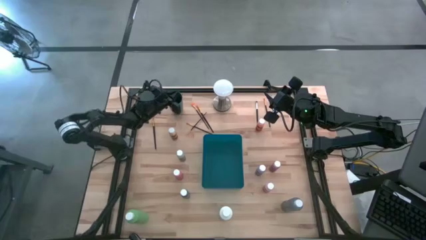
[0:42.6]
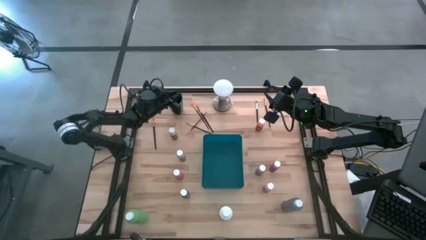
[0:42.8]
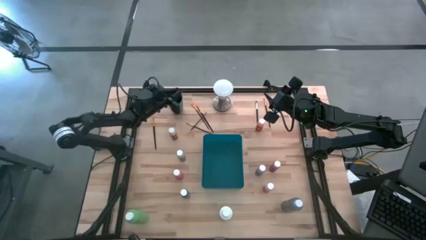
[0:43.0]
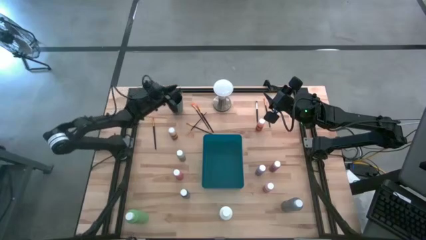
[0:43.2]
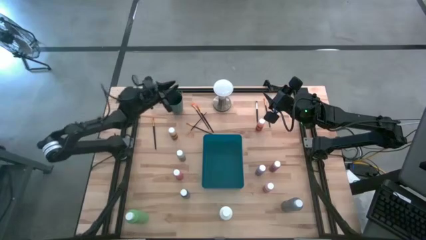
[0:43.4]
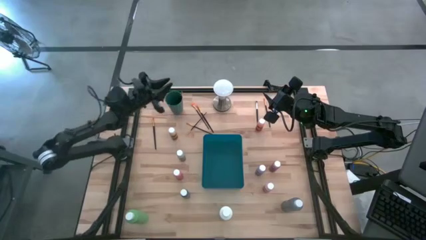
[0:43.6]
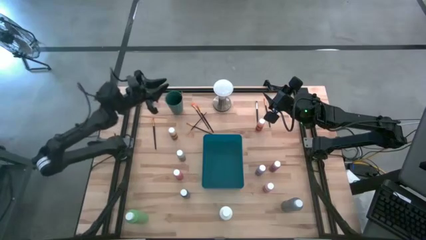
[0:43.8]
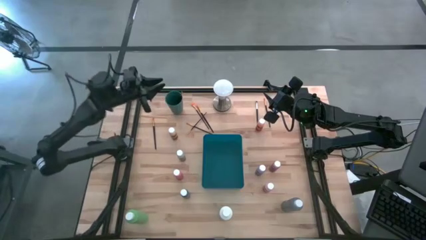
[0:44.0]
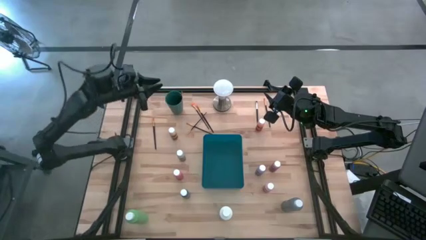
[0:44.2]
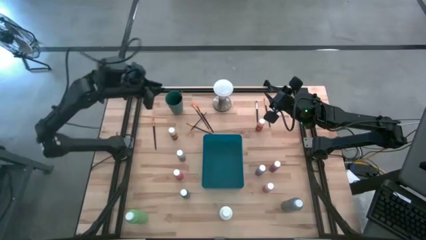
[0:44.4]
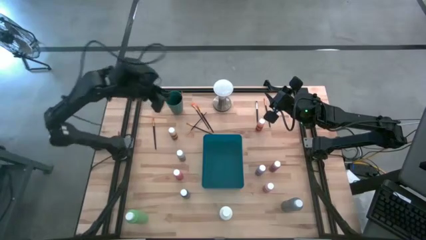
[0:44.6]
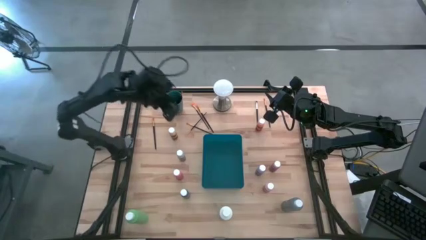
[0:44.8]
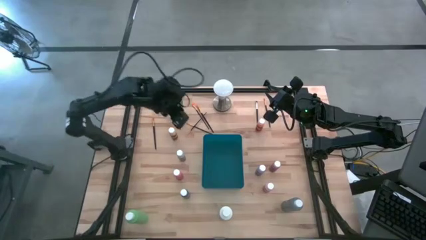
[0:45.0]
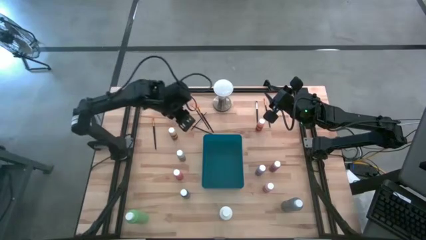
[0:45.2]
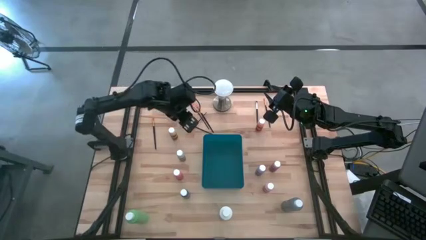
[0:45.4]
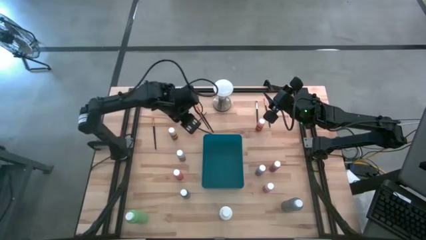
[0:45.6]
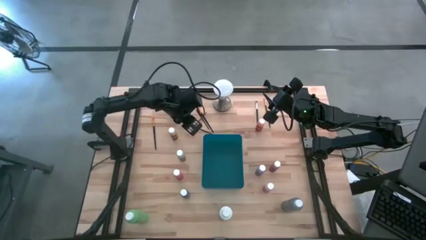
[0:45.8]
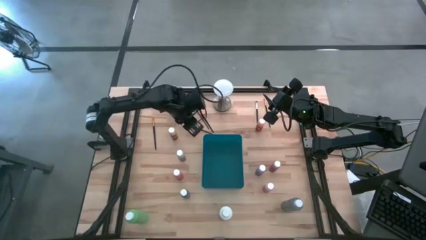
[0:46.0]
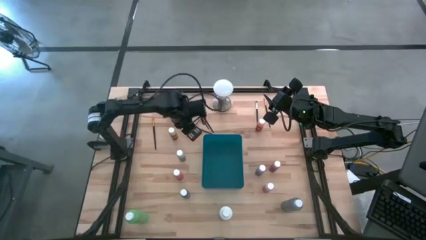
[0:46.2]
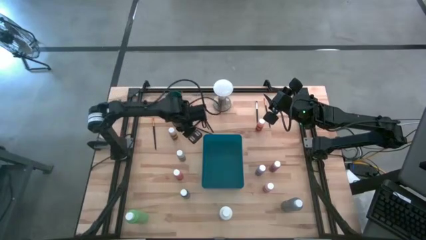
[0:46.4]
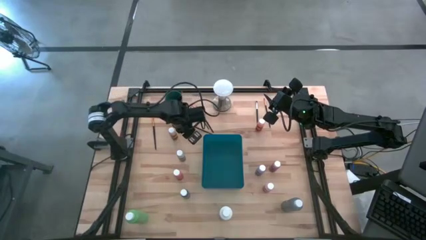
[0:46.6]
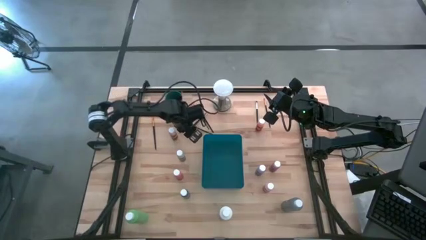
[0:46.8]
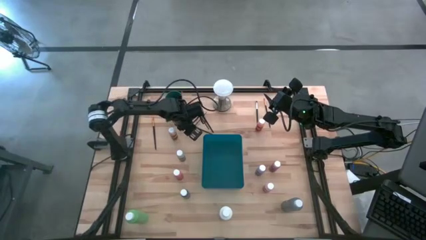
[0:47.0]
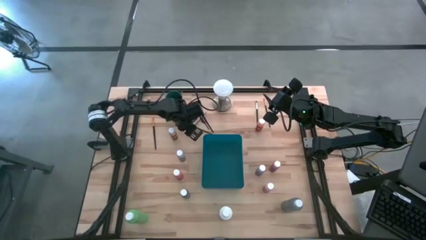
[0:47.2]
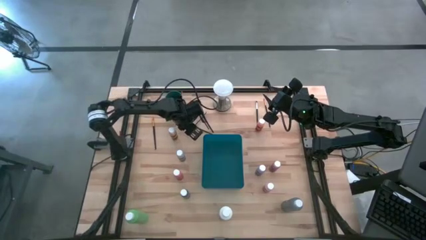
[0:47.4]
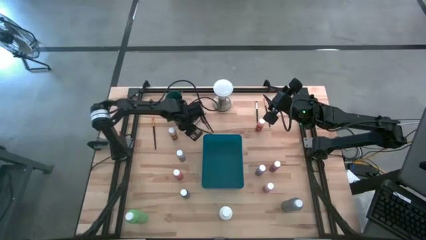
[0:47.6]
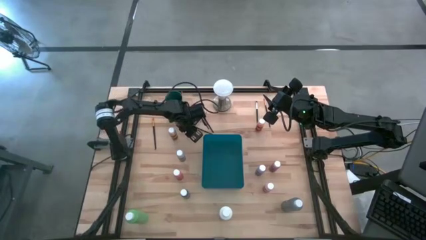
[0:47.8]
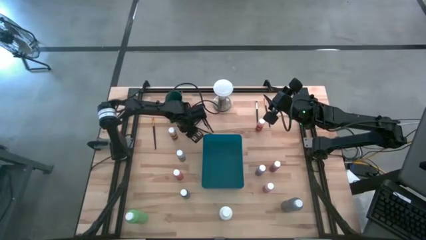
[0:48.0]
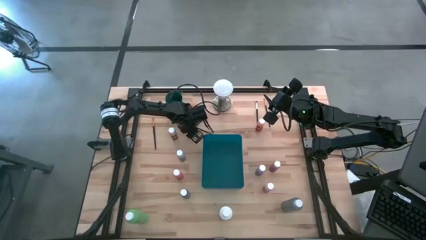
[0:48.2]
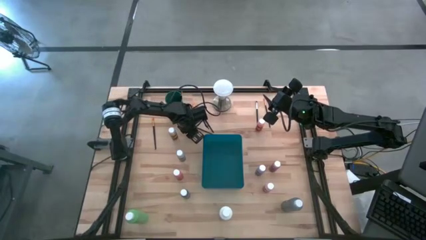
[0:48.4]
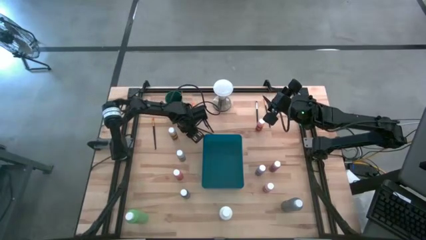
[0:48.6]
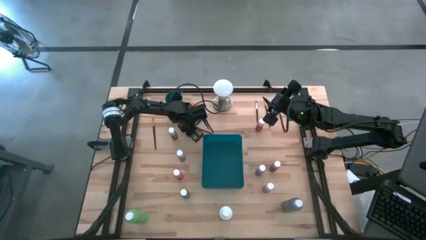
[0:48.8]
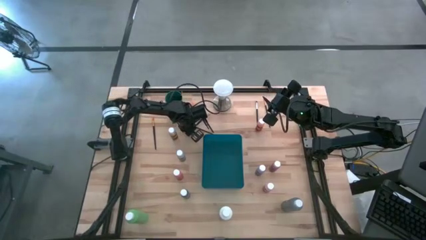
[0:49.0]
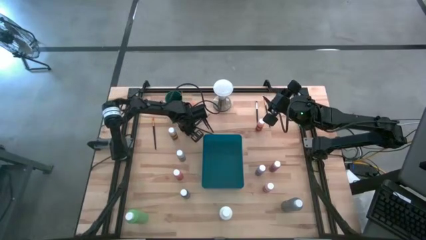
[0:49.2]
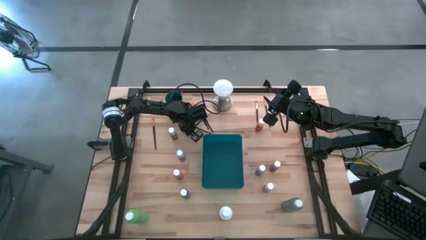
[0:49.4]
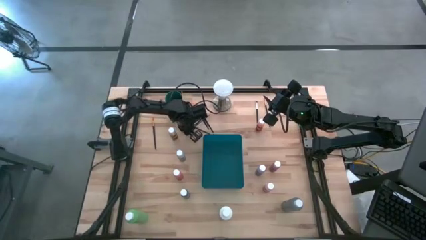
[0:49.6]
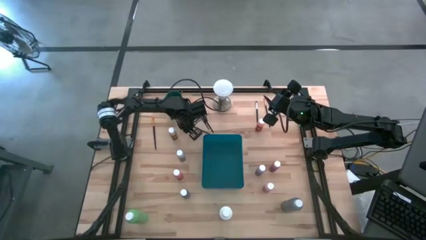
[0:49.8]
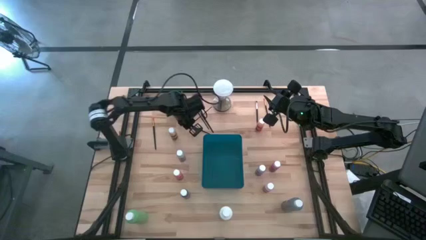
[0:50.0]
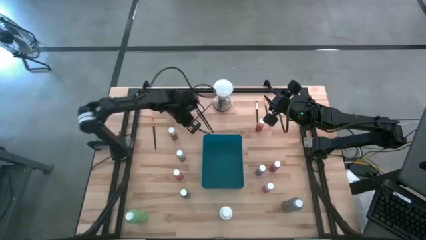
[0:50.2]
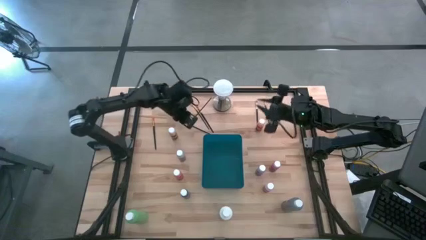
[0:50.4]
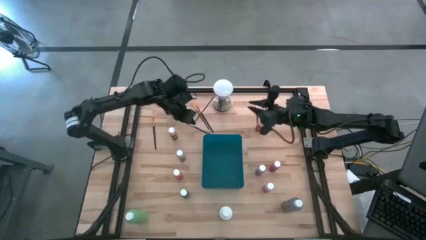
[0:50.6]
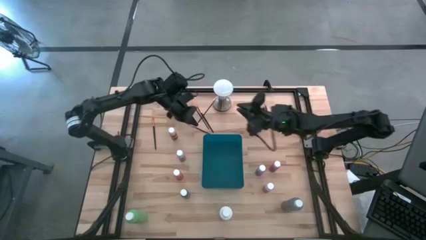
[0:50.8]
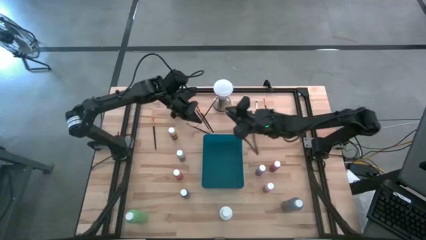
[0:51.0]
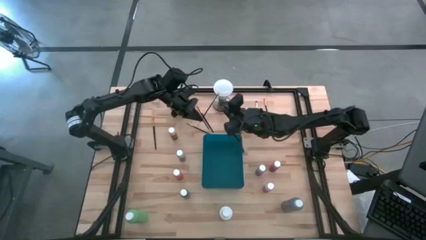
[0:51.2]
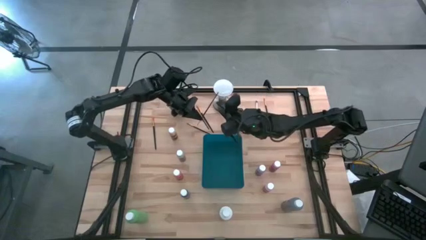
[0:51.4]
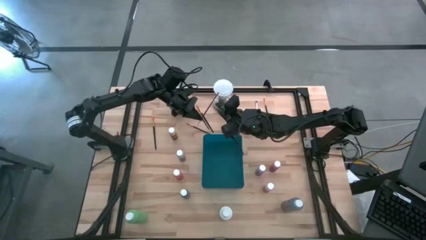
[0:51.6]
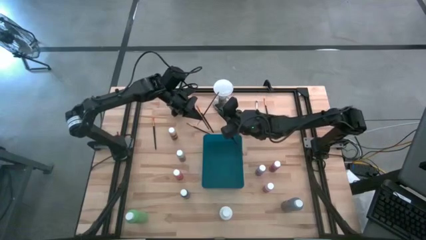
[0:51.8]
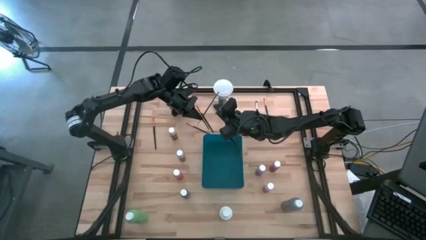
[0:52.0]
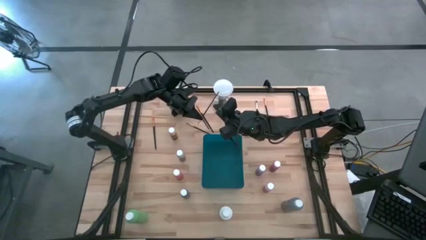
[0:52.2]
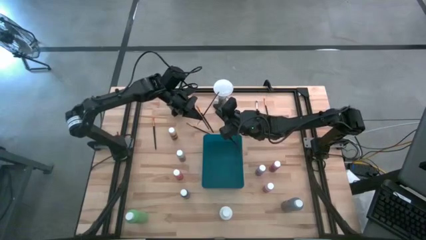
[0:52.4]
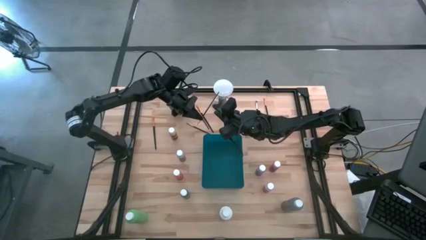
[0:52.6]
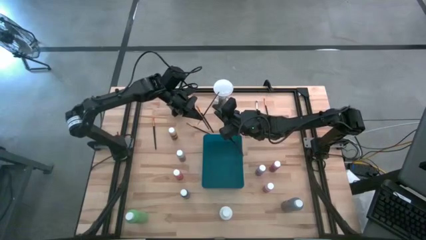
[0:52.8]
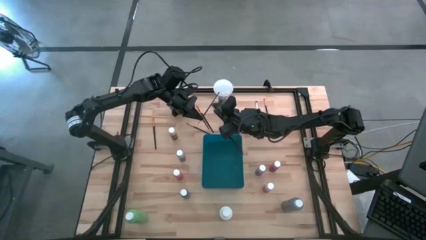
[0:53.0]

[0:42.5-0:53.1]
Task: Pick & Place Paint Supplies
Put the yellow paint brush into the green cup

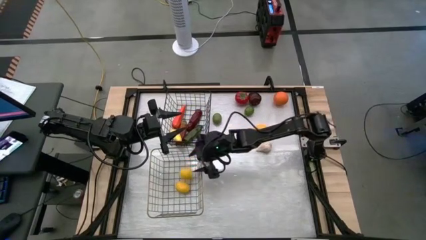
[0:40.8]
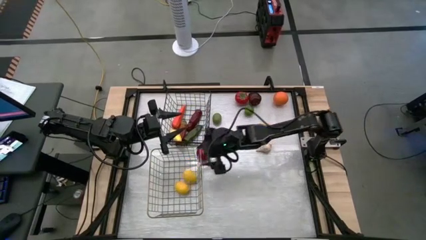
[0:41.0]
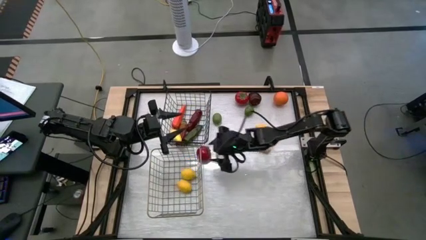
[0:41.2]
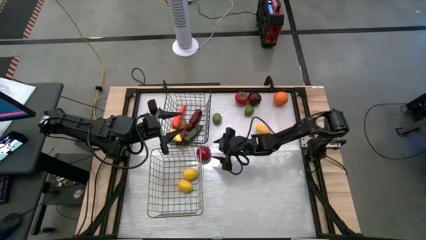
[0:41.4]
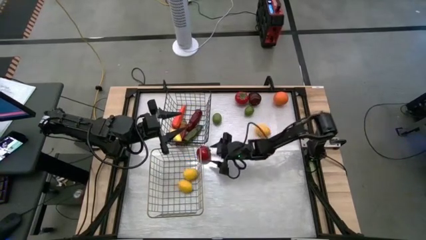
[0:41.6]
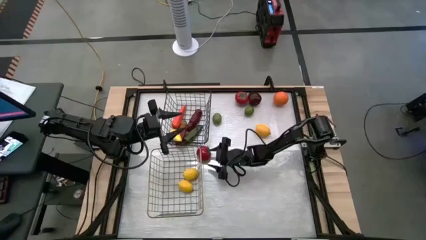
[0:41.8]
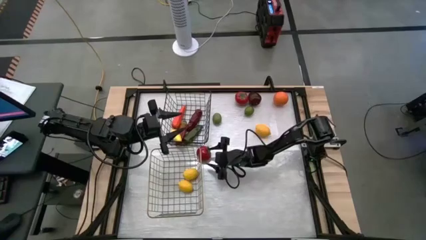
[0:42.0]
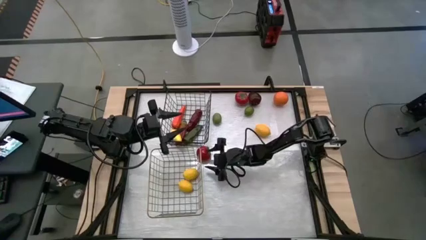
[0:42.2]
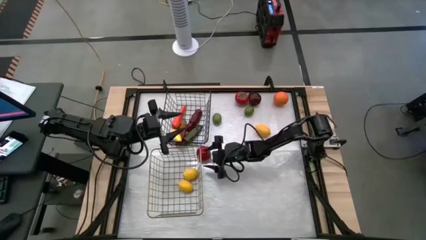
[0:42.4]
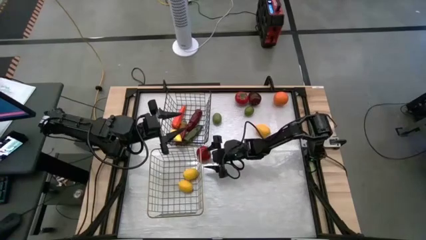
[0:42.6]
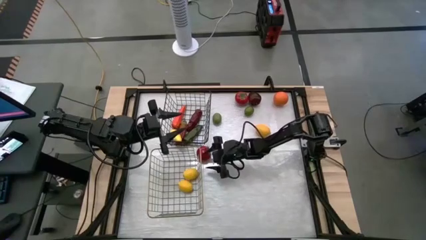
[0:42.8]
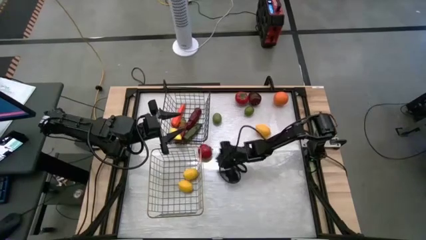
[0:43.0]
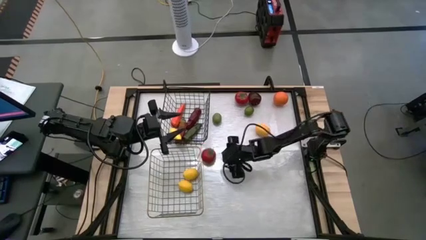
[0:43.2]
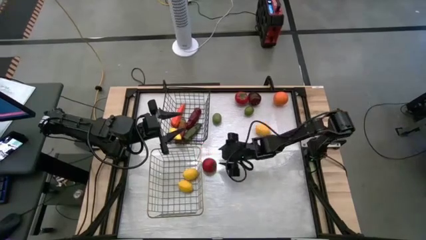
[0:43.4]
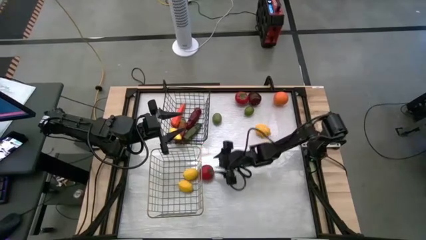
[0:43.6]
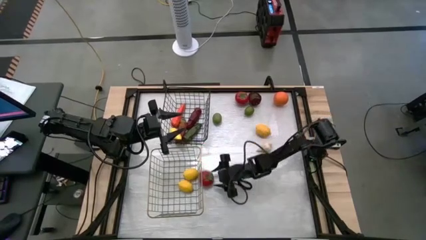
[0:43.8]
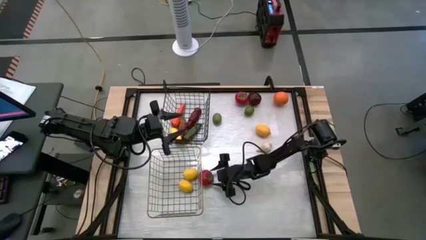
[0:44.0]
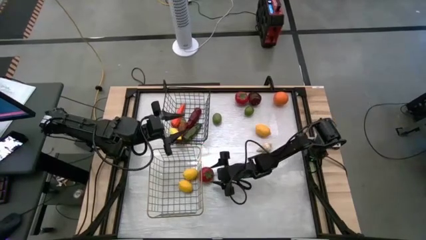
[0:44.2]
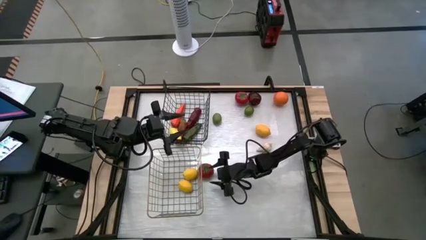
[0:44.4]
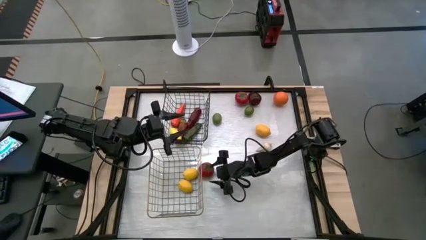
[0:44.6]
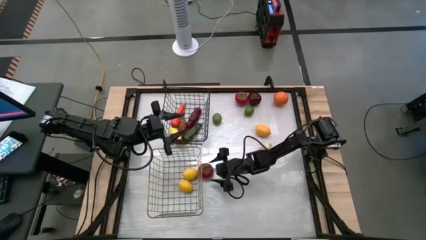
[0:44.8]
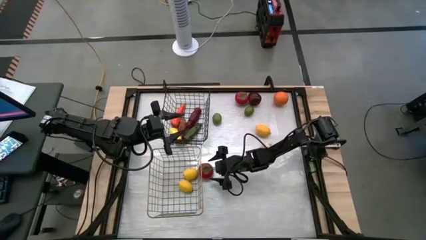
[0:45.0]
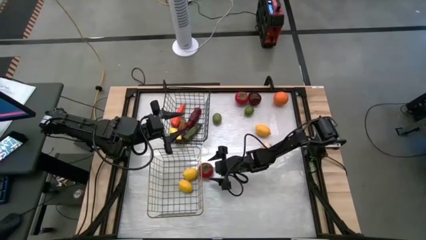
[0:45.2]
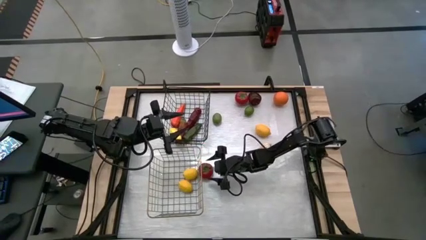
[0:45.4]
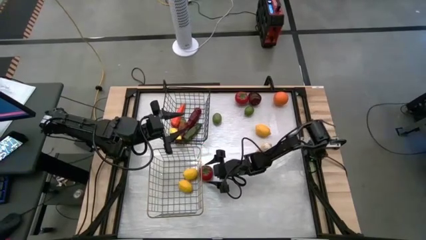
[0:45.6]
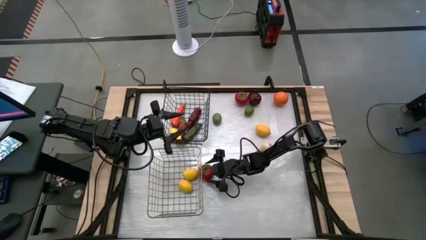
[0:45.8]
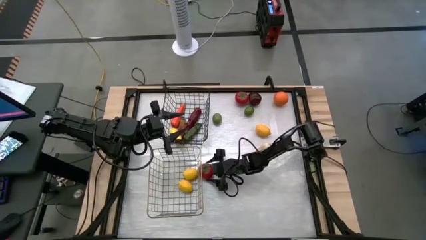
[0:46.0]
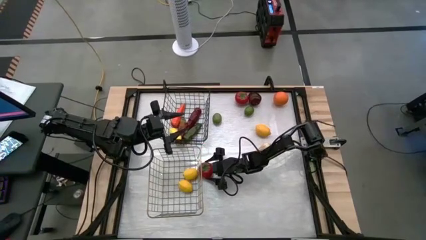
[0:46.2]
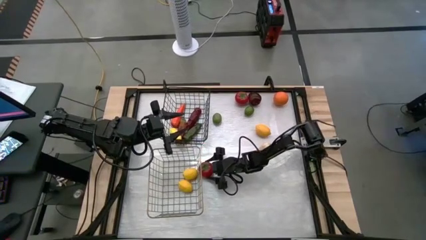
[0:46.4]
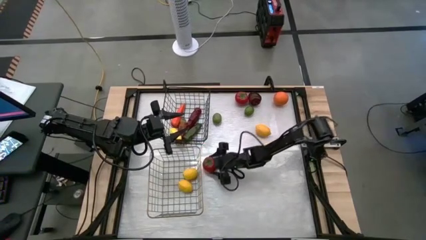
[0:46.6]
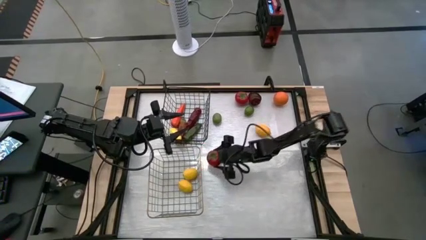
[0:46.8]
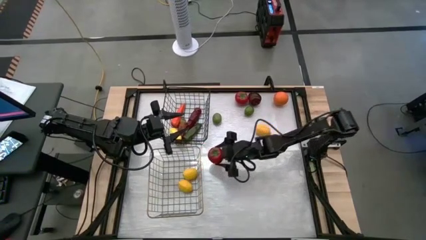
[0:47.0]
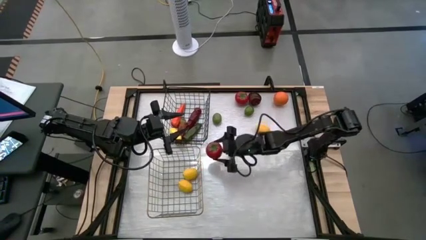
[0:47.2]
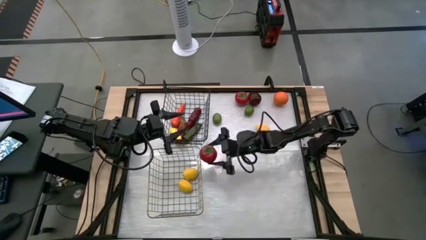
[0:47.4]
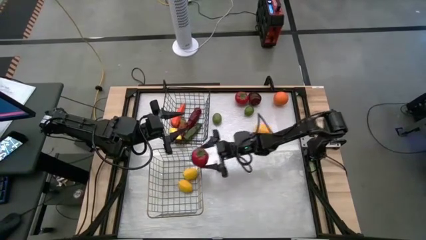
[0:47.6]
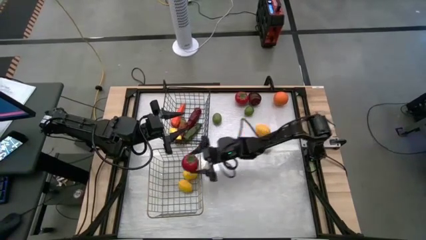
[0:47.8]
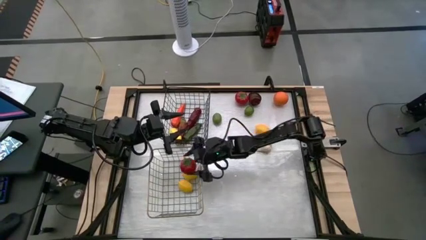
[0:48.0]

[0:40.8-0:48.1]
Task: Sort produce into baskets
Put the bottom red tomato into the gold wire basket
